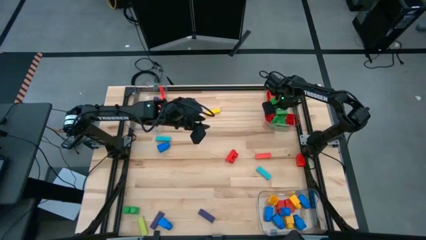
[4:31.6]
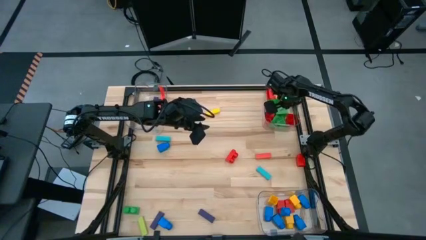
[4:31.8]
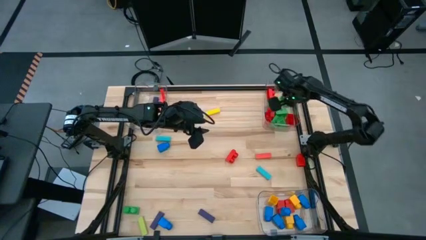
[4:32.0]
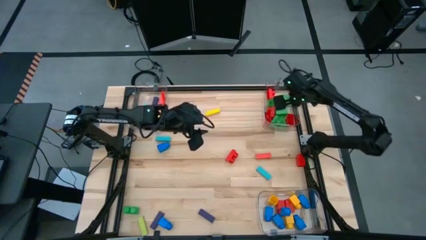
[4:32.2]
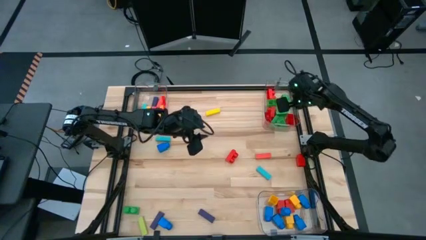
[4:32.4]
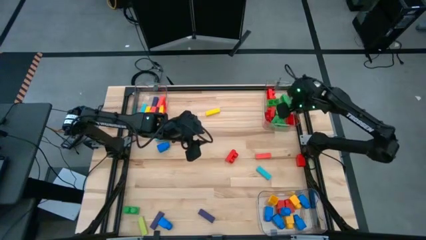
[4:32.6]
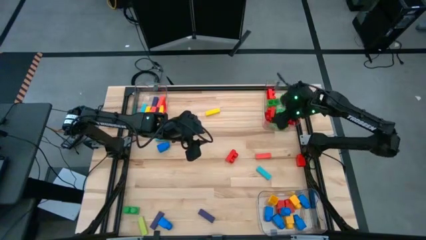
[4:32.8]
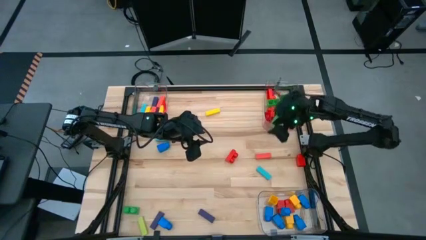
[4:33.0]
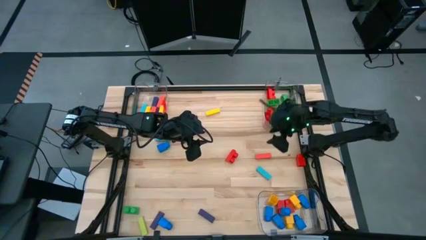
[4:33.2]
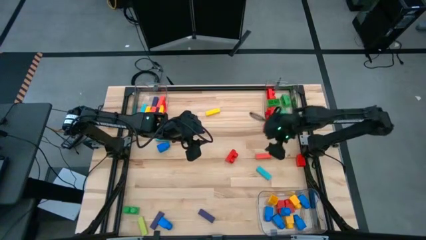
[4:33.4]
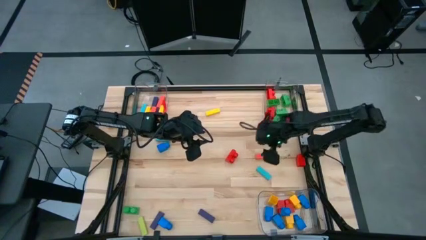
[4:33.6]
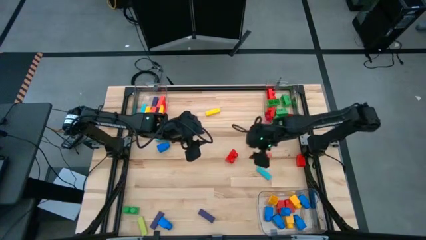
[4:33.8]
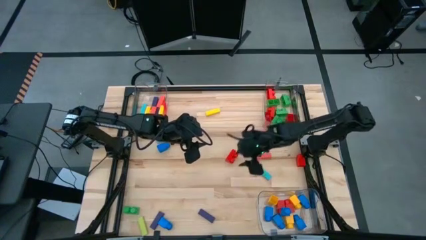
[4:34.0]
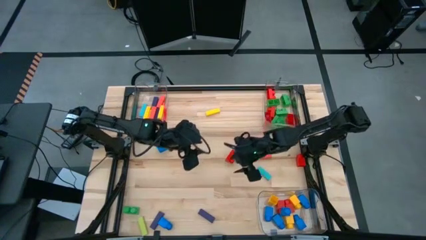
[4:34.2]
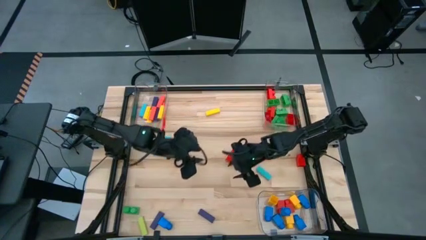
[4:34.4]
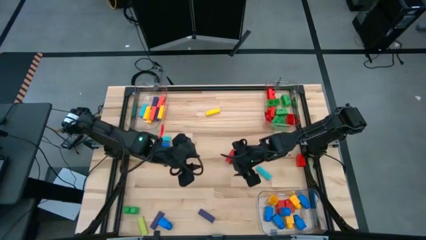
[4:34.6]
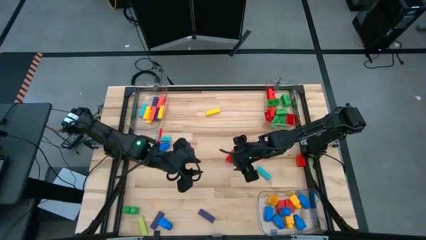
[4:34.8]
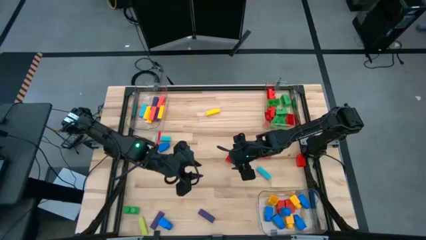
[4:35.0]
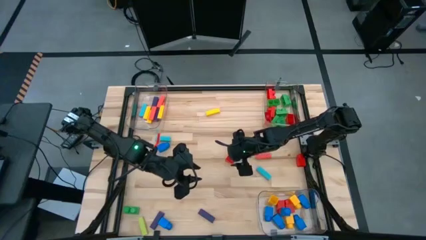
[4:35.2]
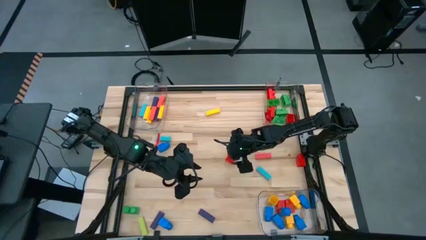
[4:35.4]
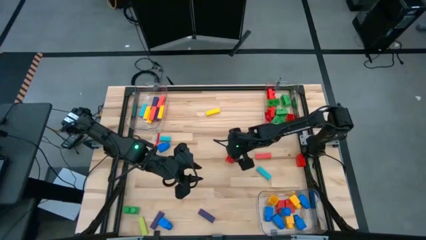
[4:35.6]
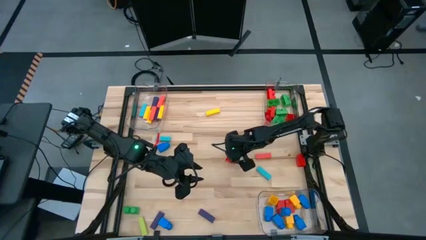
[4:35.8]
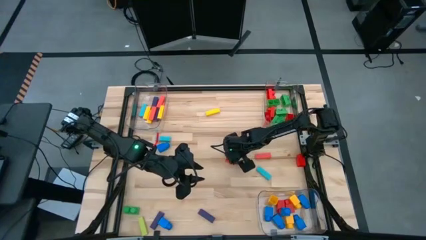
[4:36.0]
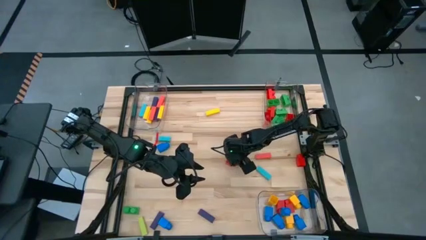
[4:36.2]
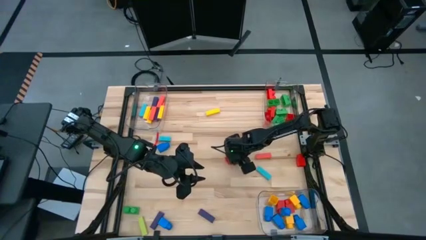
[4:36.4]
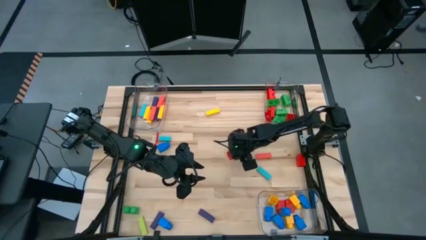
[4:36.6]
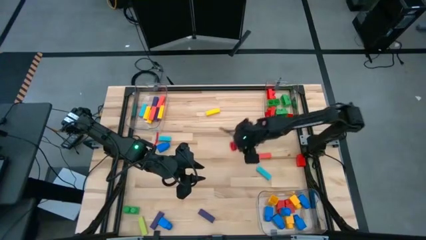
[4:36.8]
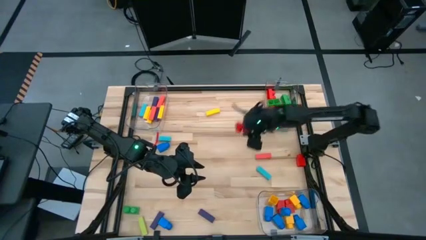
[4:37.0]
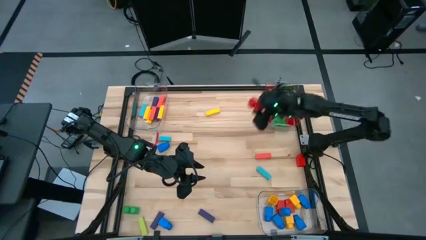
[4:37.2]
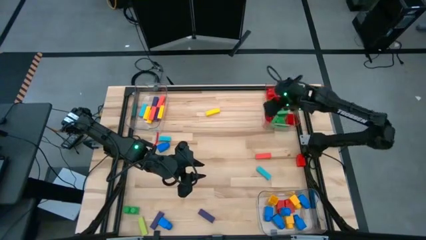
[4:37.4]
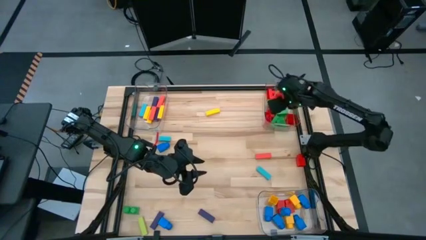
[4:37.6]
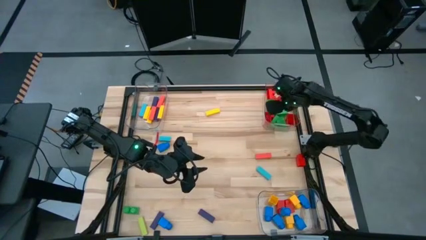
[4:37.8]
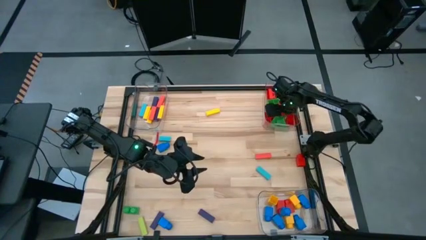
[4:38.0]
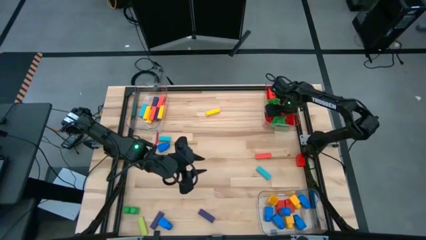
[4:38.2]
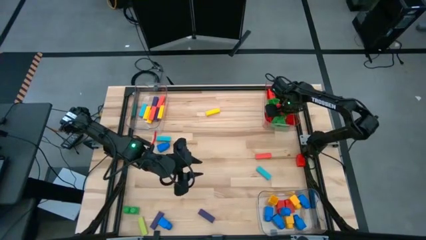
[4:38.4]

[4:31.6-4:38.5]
Task: Sort blocks by size
Put the red 2 stud game piece into the top right transparent bin

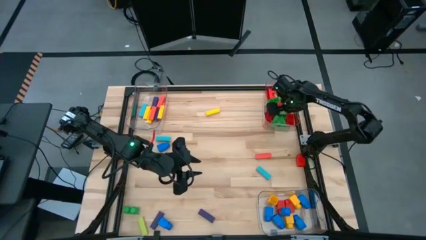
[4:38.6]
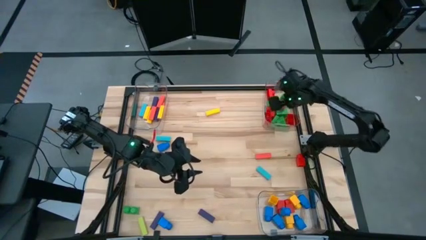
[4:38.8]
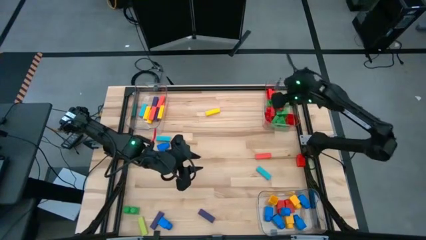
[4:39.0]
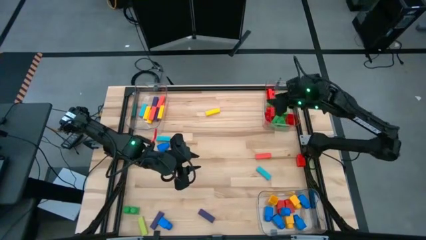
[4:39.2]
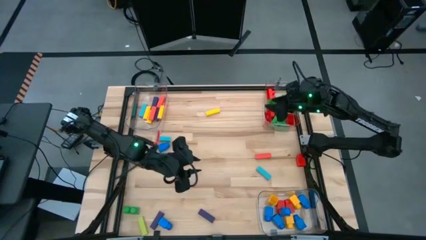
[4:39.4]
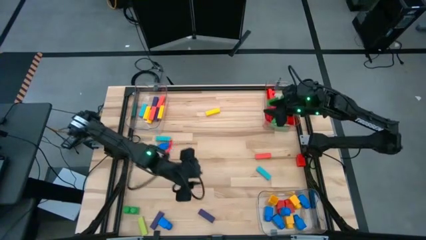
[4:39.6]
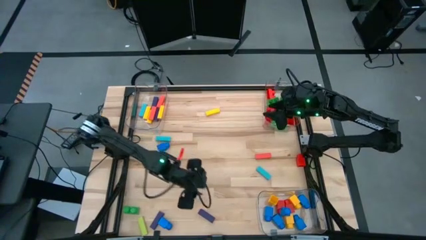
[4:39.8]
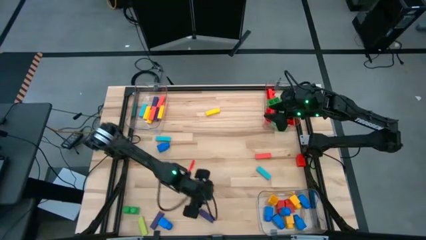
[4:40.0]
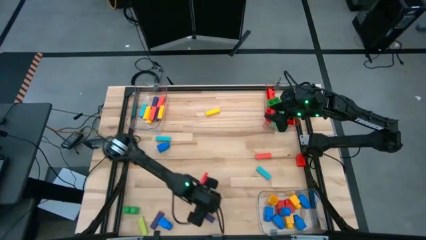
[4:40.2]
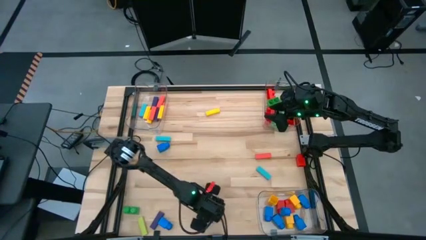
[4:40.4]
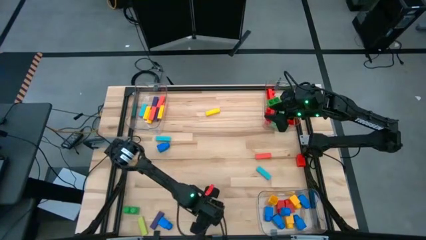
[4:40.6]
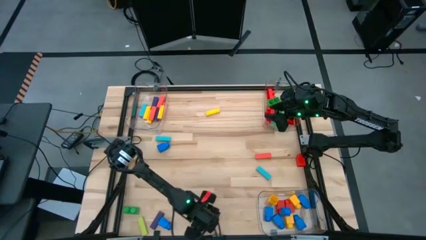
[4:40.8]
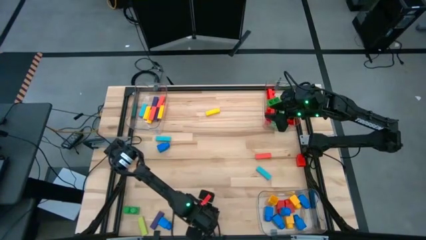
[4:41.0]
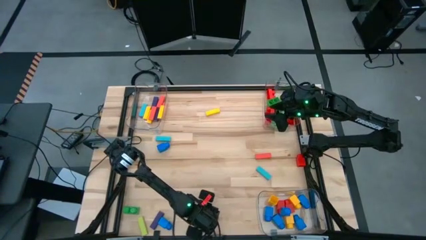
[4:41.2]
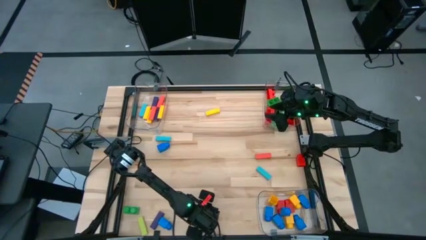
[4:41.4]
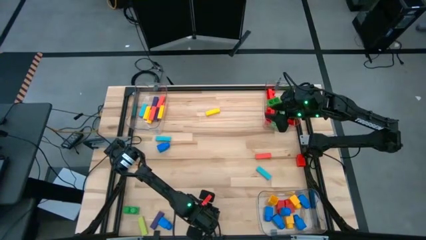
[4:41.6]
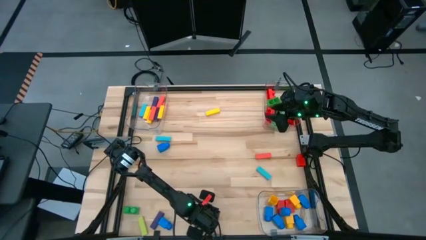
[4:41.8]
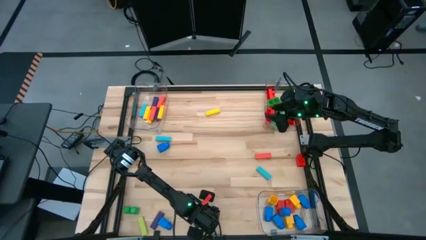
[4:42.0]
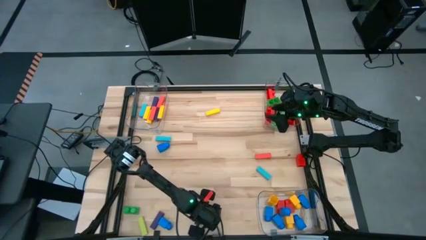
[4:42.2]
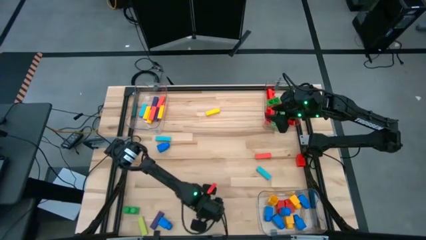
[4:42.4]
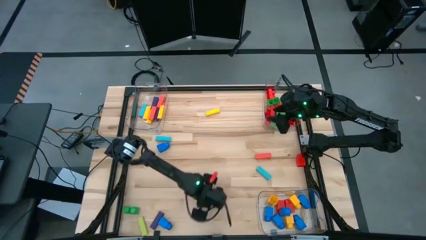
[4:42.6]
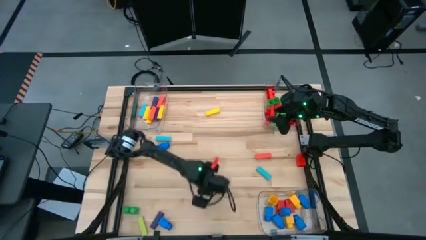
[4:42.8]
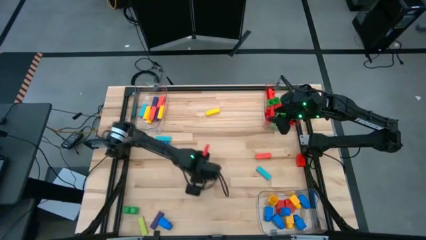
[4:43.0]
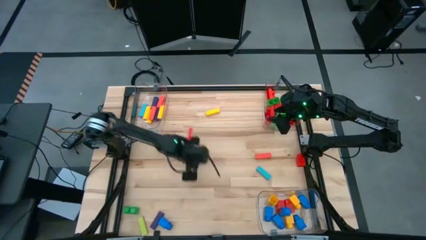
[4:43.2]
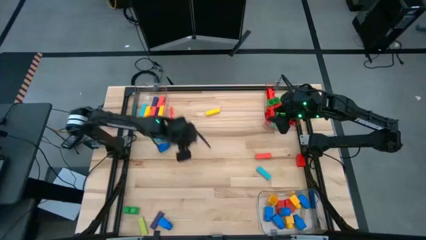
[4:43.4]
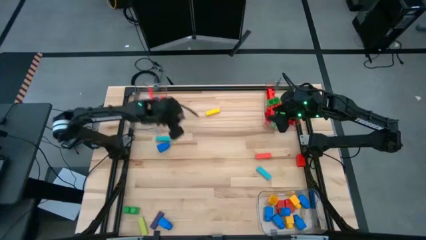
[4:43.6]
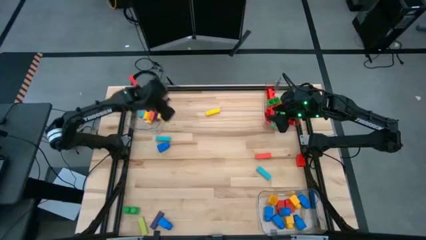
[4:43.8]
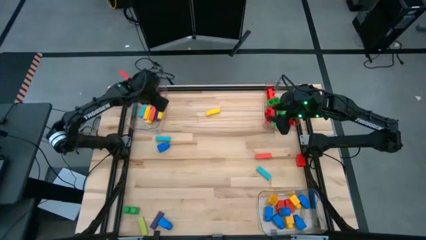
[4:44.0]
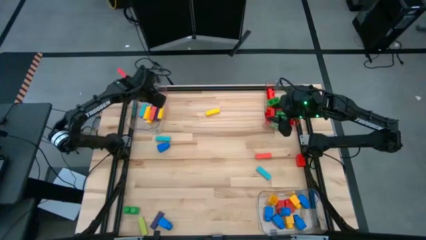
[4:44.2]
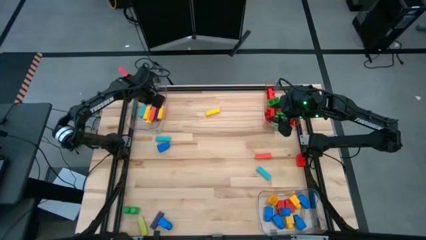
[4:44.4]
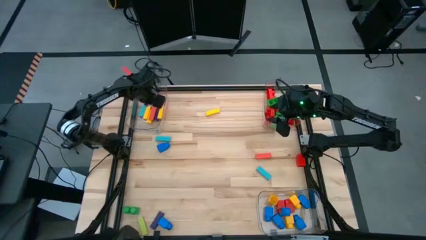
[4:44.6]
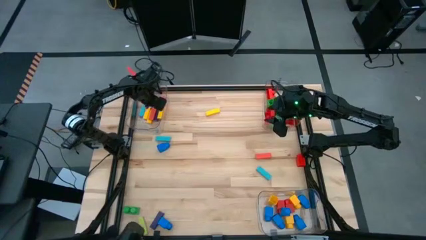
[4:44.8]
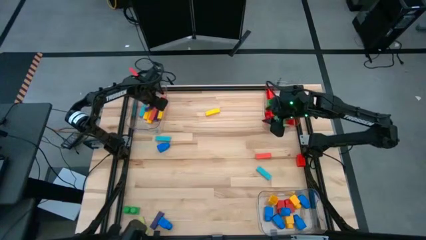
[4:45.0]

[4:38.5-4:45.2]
Put the purple block into the top left transparent bin
